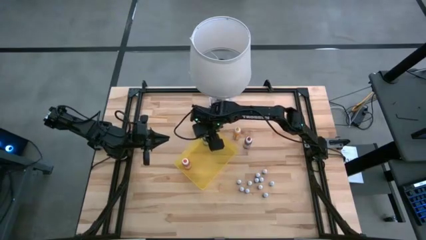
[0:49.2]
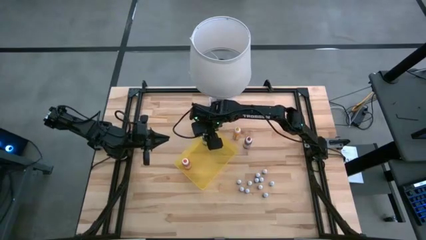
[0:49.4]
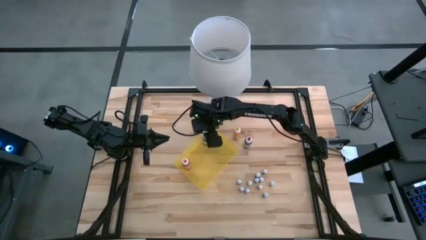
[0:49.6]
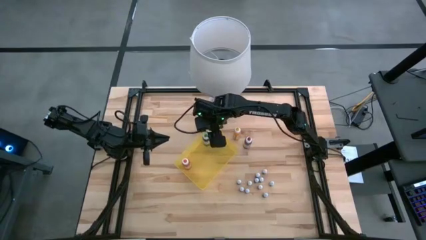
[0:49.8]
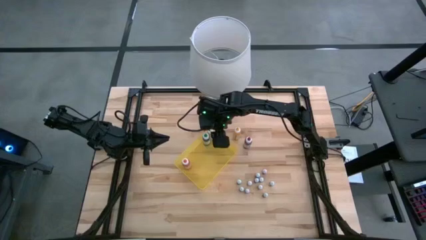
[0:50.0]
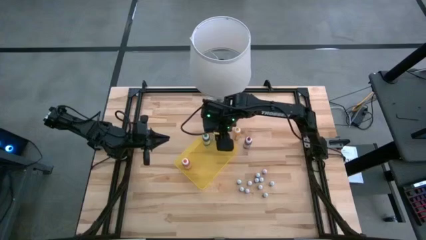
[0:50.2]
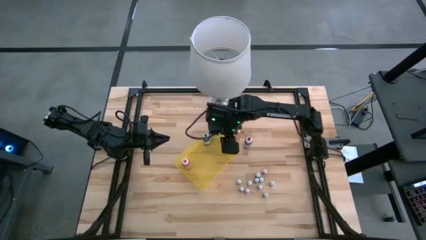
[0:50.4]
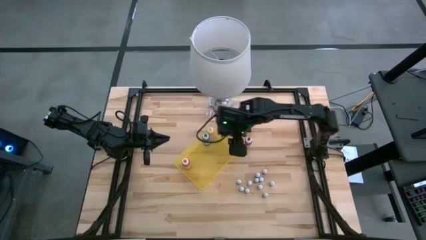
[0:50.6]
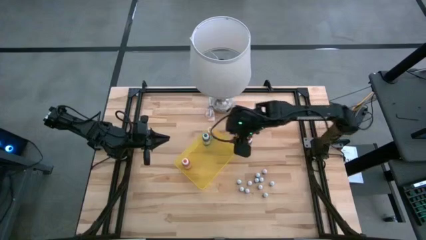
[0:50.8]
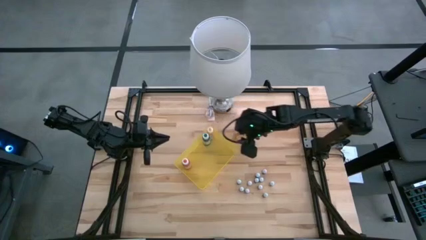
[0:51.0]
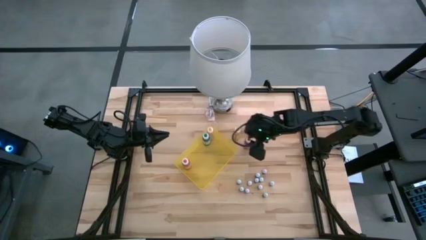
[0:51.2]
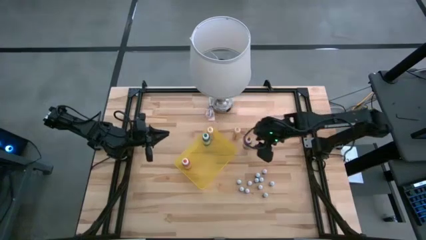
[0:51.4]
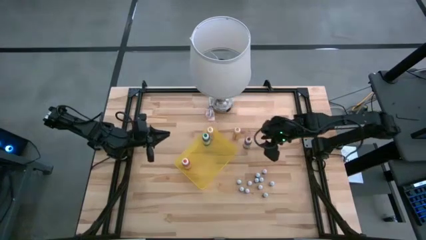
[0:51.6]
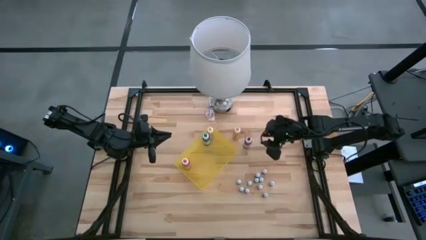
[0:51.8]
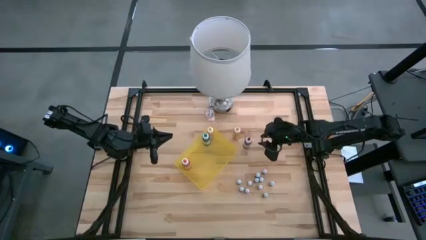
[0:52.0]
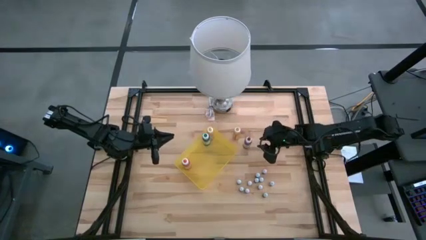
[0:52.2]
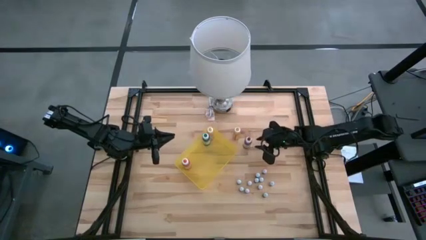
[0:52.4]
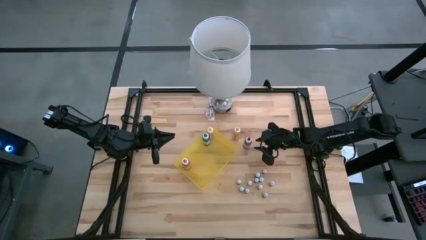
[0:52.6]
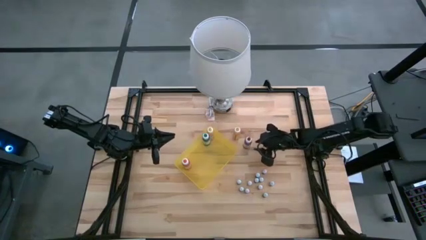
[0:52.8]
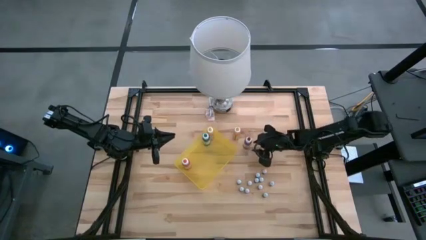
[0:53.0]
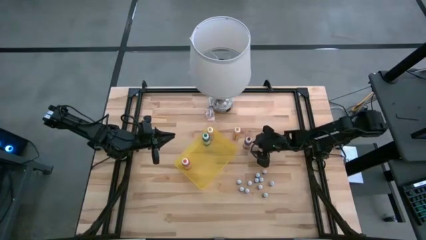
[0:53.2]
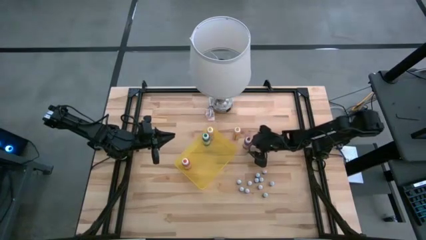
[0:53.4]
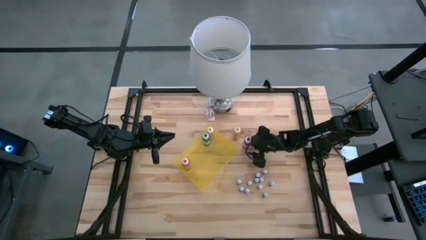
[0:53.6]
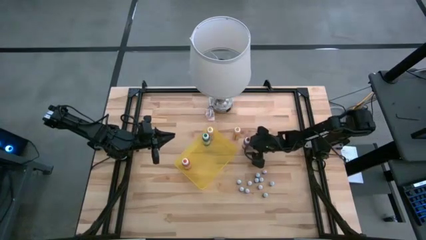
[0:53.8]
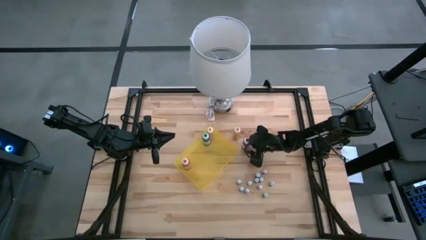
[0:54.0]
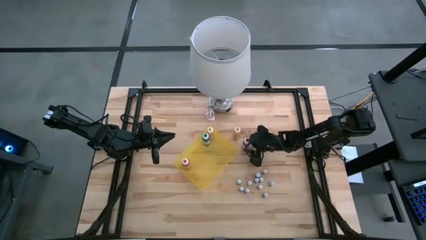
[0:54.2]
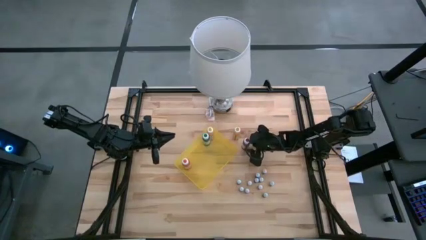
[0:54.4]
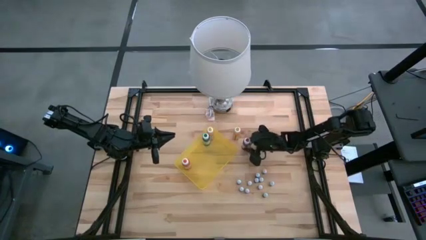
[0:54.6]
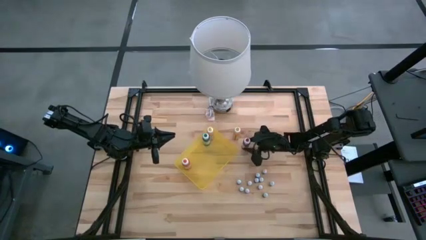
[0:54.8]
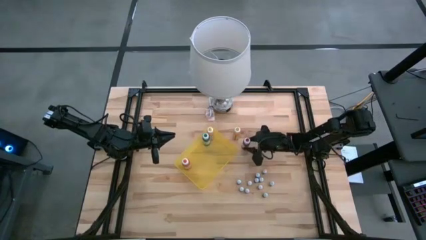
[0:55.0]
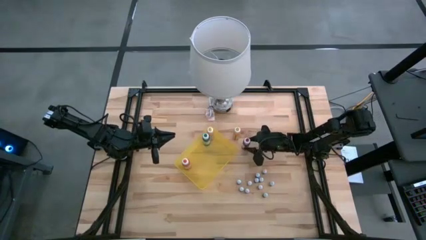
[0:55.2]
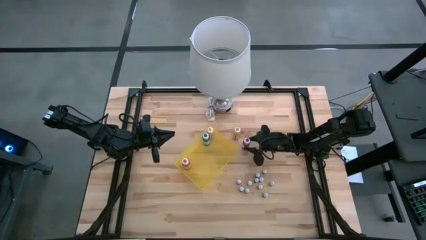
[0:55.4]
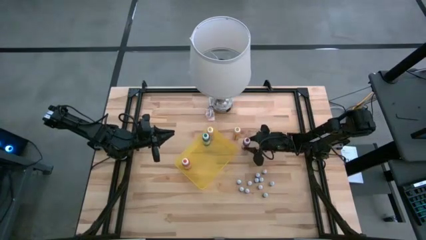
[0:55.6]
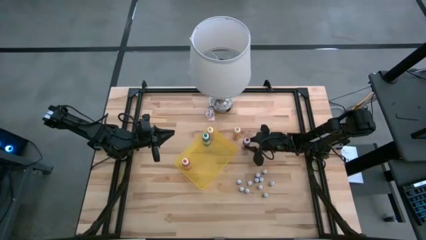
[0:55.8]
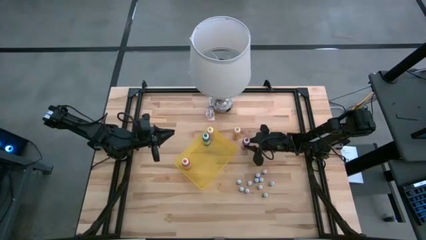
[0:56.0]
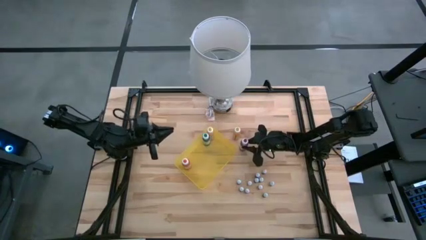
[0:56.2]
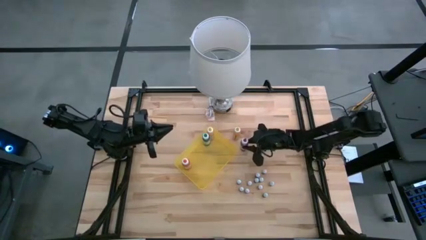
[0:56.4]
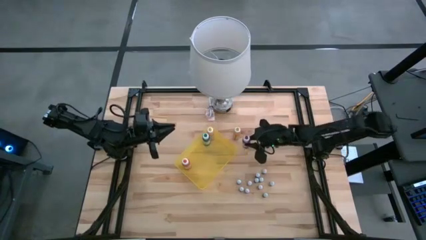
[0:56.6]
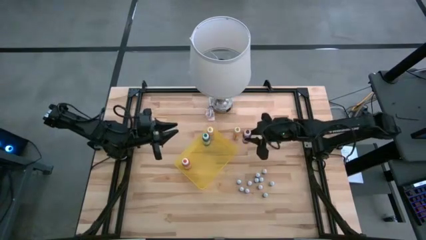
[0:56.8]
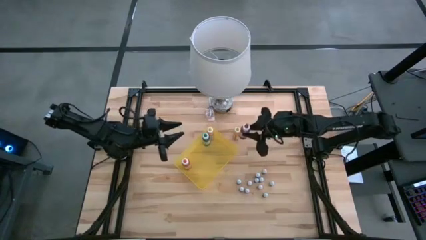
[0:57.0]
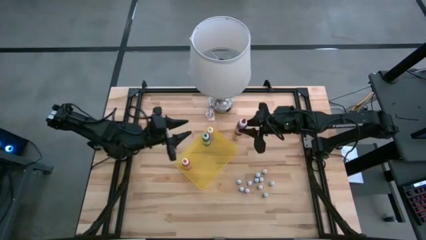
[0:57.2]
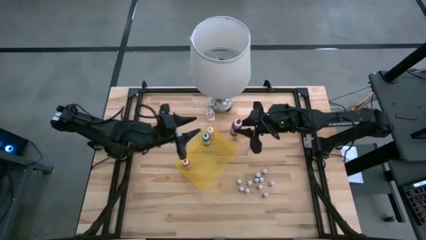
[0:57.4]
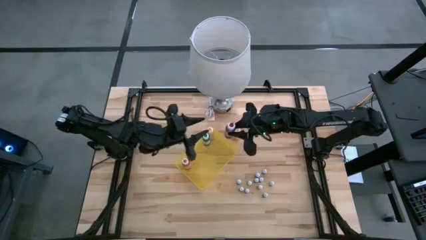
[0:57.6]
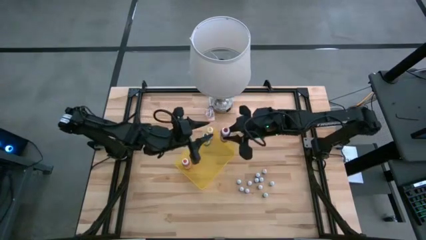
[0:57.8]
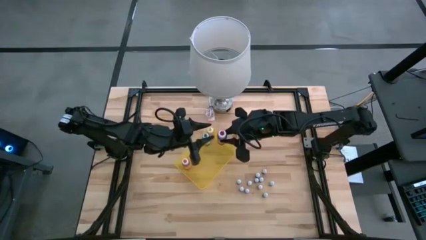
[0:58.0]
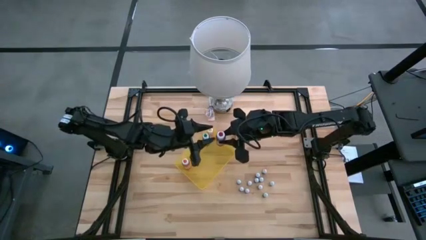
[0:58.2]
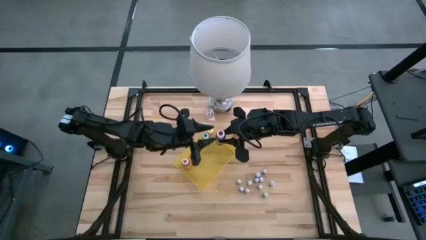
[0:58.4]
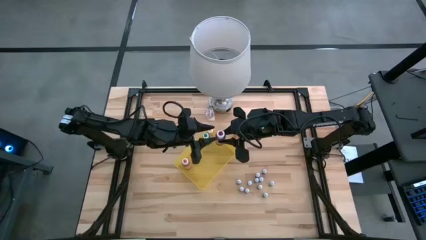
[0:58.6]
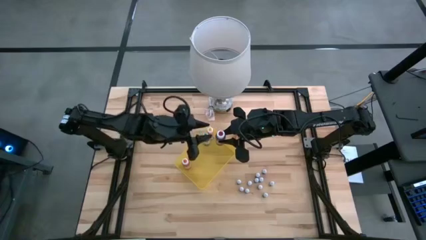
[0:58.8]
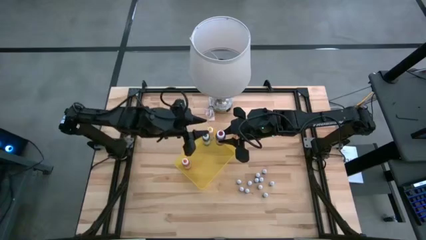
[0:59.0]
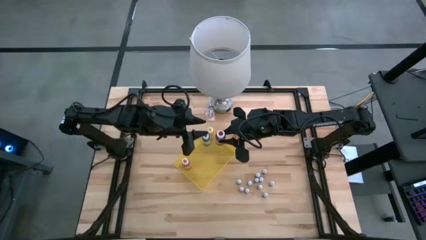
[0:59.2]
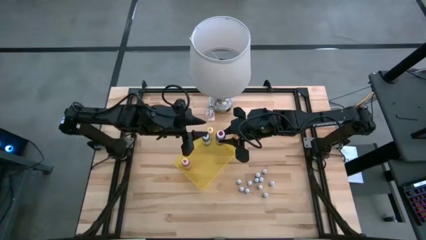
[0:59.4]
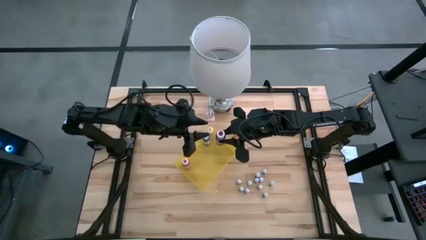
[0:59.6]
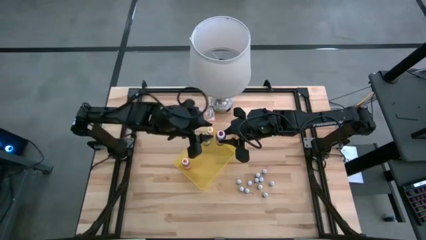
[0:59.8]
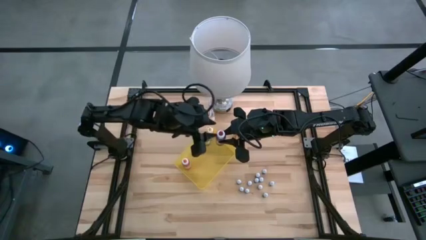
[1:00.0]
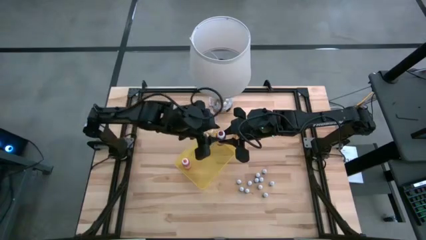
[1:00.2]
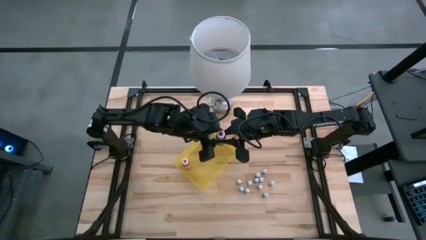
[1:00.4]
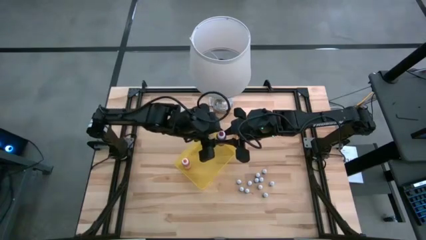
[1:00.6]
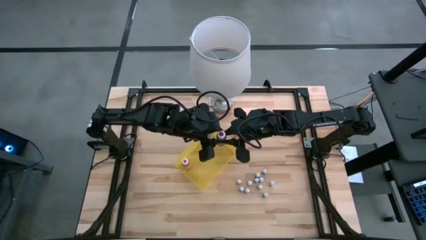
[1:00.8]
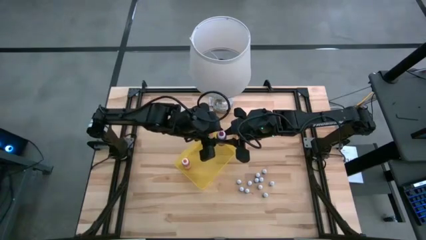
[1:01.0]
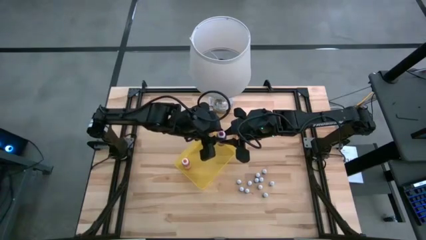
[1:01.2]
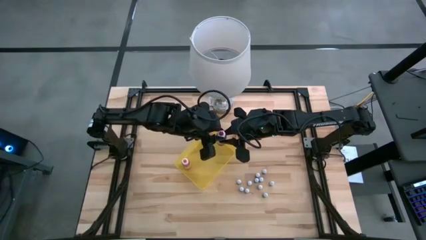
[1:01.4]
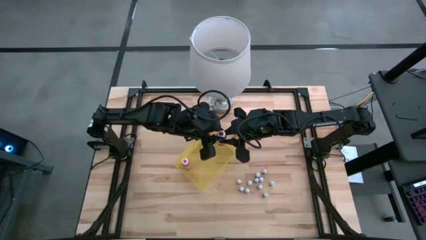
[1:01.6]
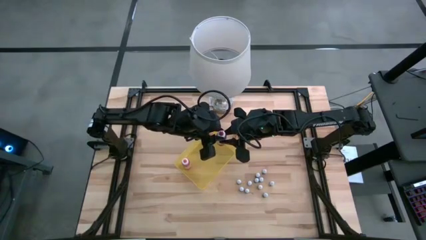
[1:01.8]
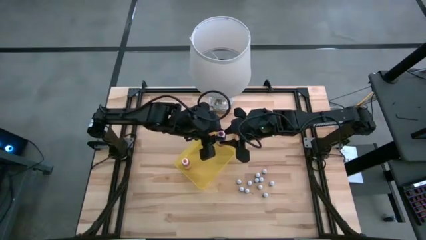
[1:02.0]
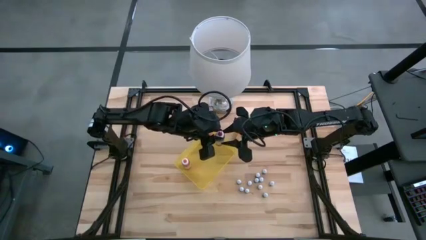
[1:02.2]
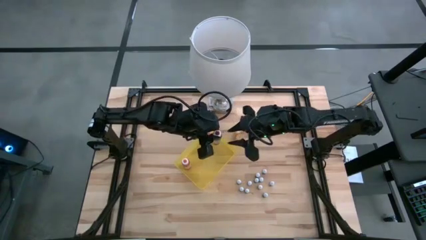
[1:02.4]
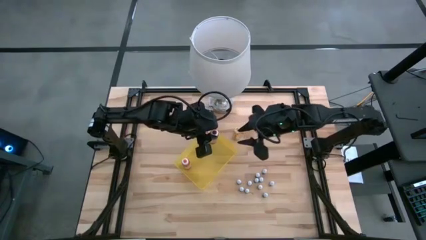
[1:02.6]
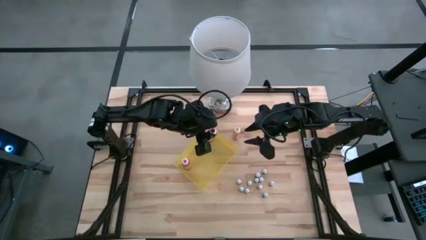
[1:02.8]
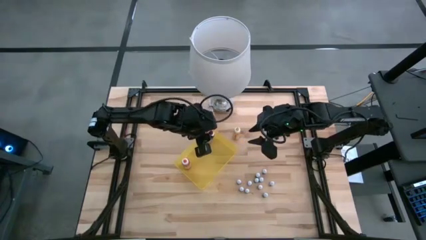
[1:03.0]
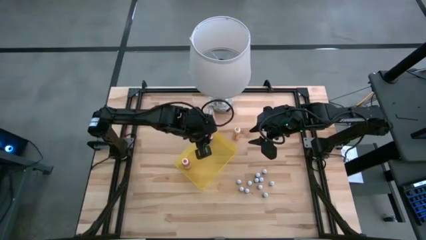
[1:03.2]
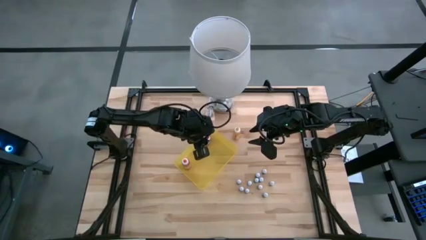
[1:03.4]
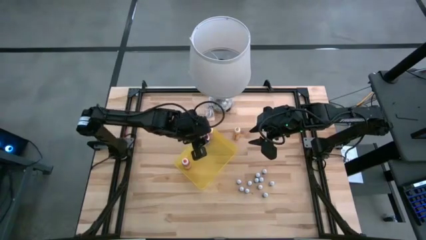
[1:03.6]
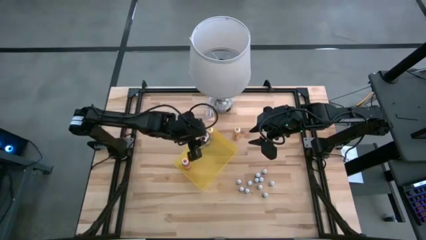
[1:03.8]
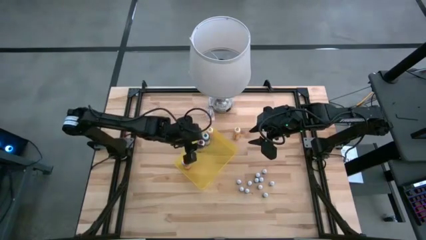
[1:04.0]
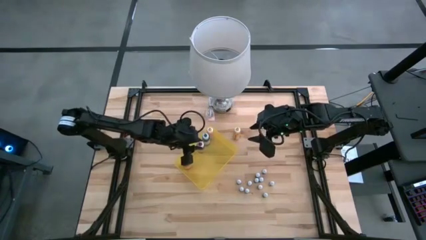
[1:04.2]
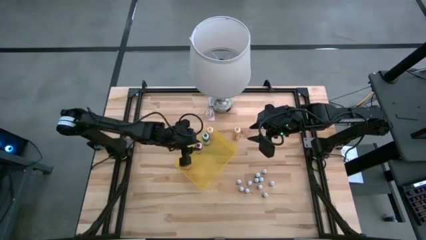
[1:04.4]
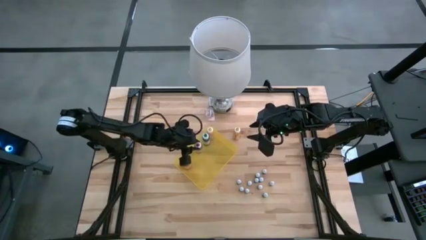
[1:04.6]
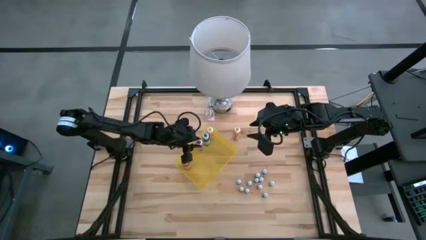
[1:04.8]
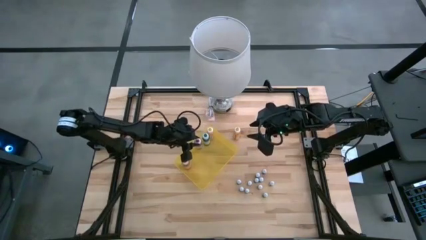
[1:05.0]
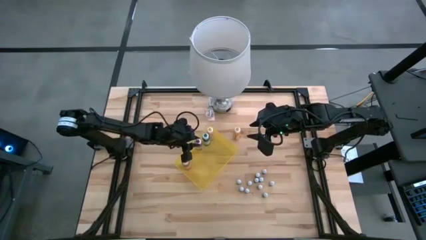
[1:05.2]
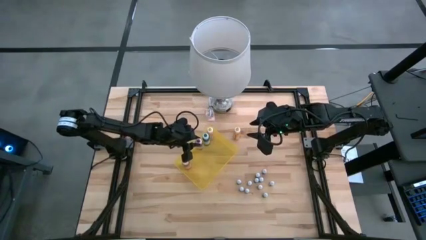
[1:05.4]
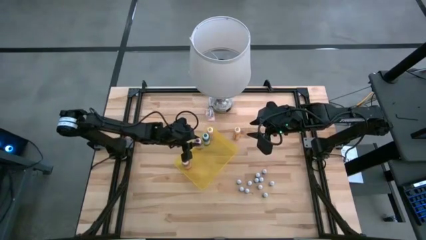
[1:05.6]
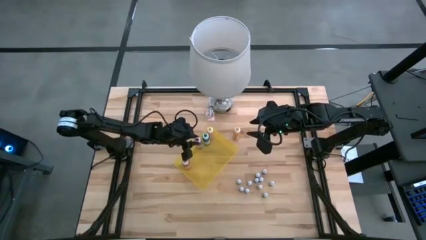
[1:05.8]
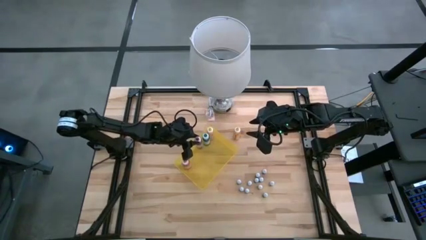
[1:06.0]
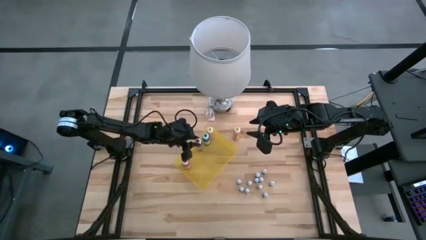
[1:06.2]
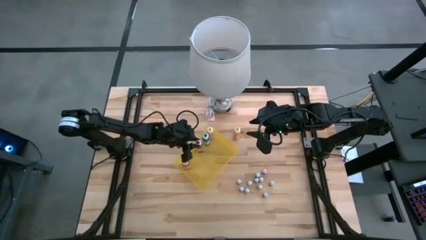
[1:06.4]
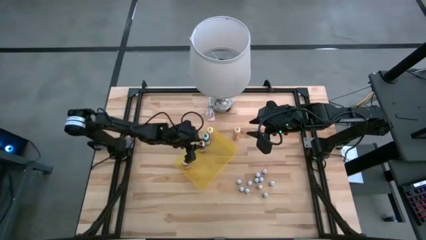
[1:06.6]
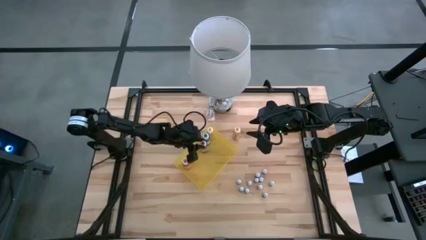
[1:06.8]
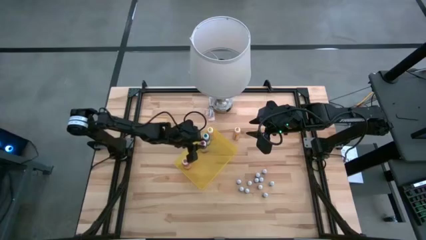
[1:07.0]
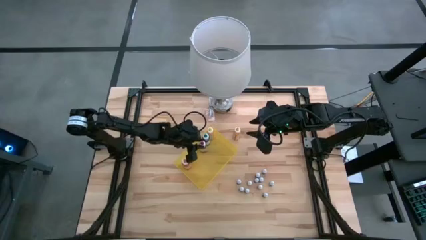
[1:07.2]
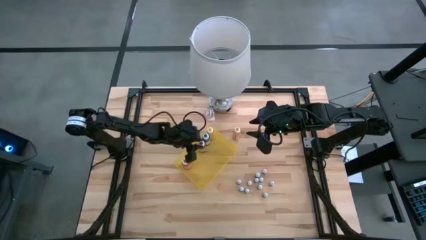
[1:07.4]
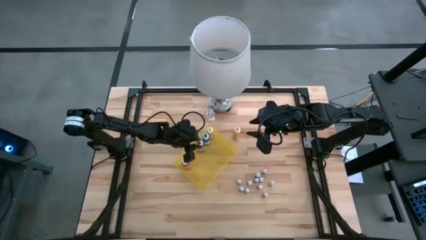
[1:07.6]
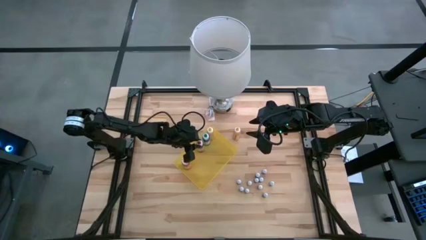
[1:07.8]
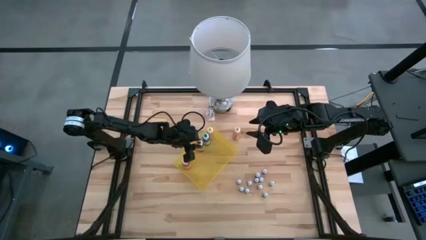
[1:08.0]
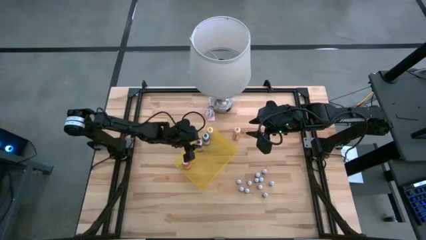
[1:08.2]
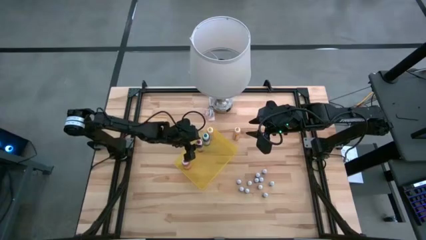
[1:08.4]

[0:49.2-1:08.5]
Task: Pick & Place food coloring
Put the large red food coloring bottle into the yellow bin
